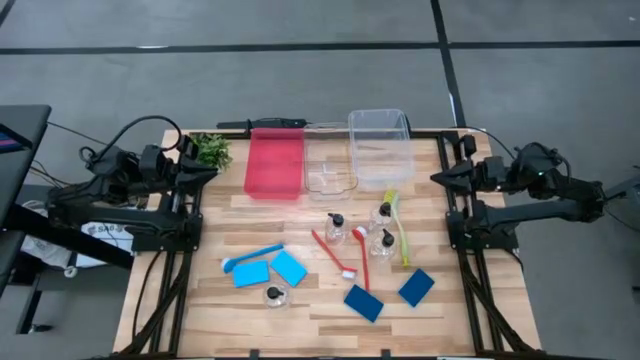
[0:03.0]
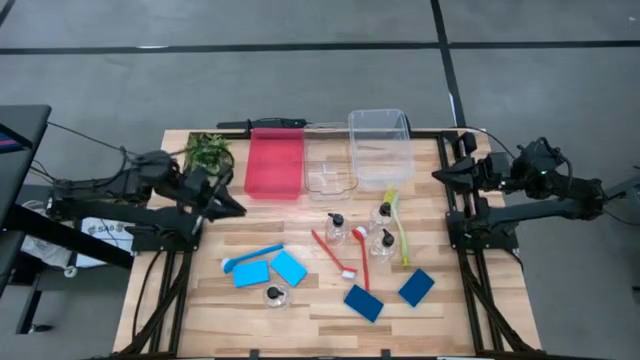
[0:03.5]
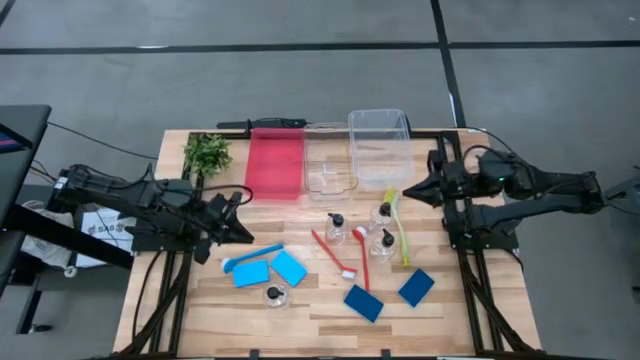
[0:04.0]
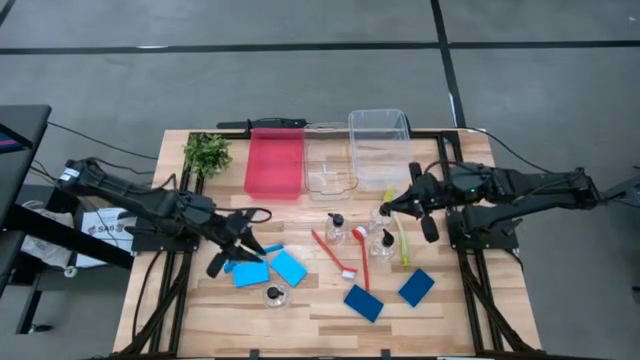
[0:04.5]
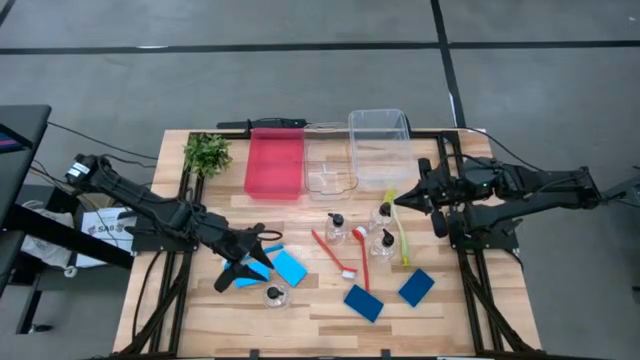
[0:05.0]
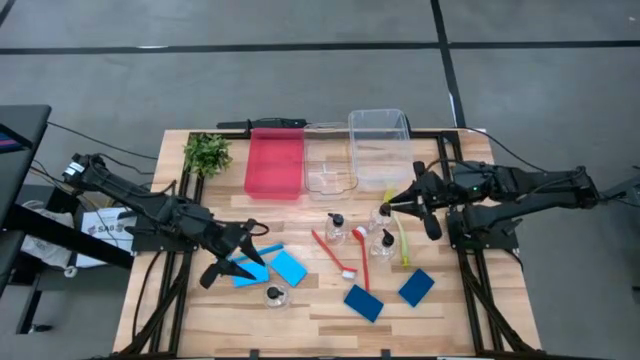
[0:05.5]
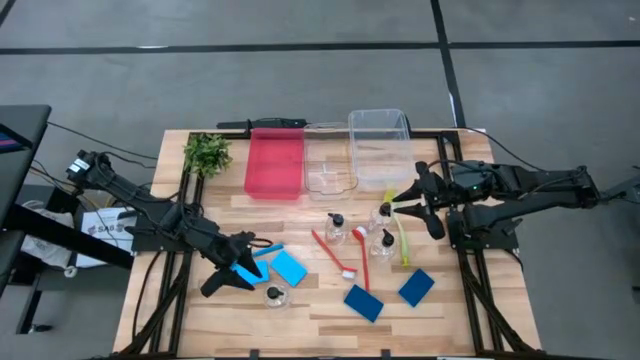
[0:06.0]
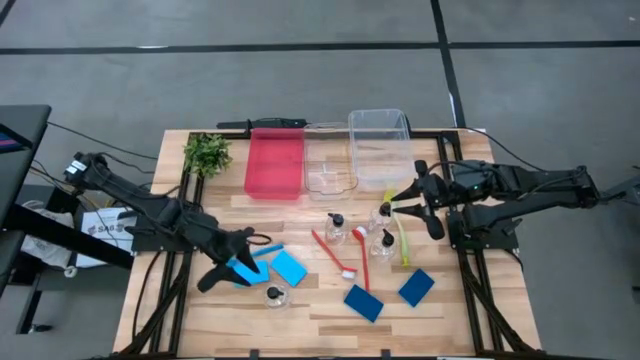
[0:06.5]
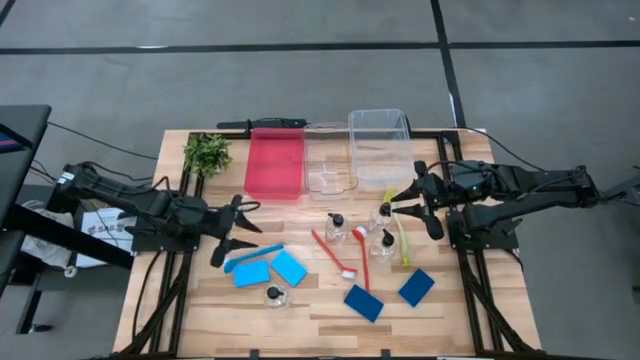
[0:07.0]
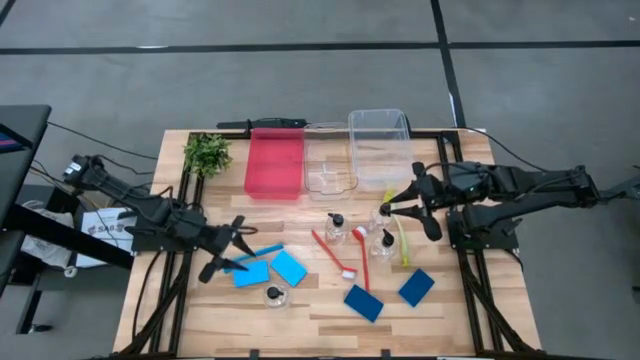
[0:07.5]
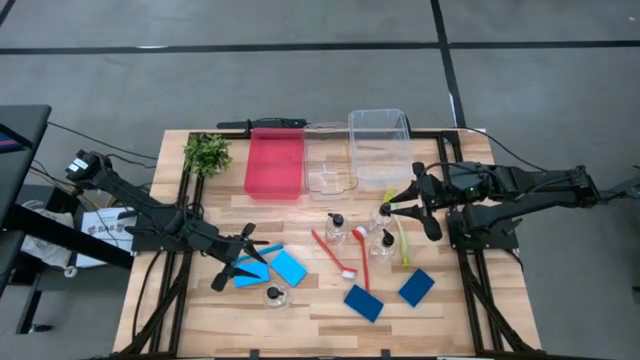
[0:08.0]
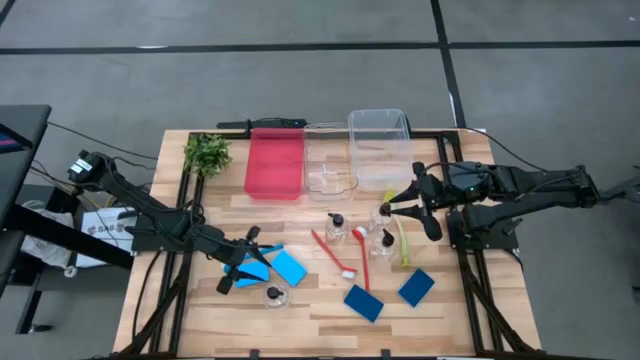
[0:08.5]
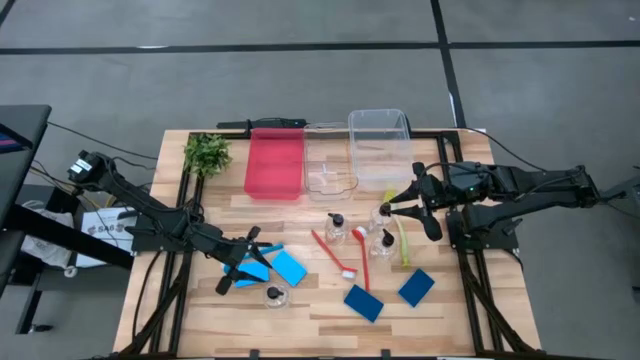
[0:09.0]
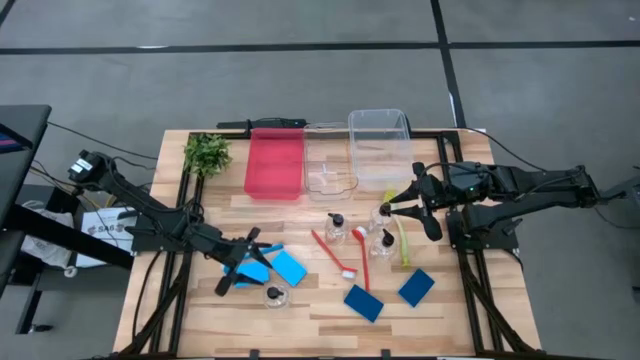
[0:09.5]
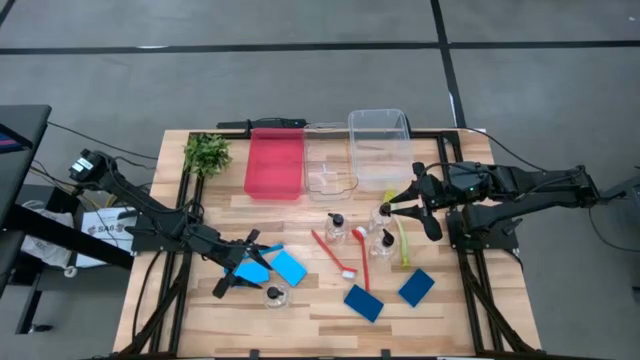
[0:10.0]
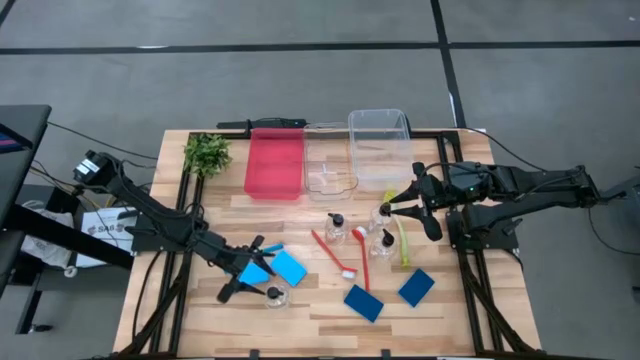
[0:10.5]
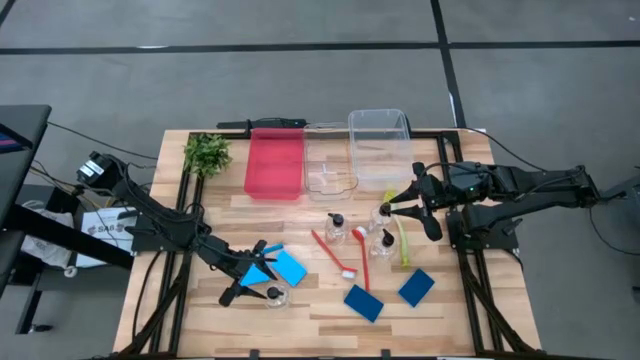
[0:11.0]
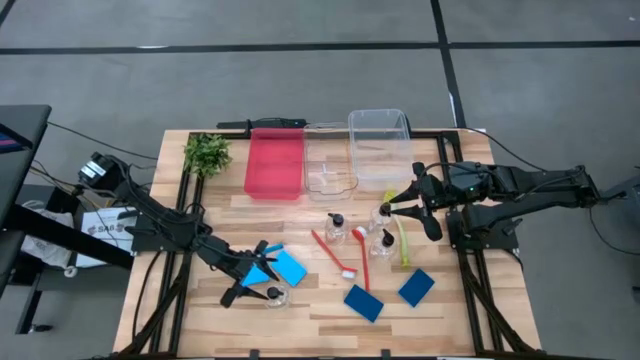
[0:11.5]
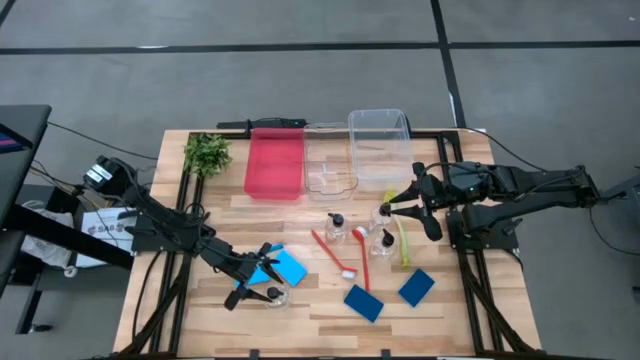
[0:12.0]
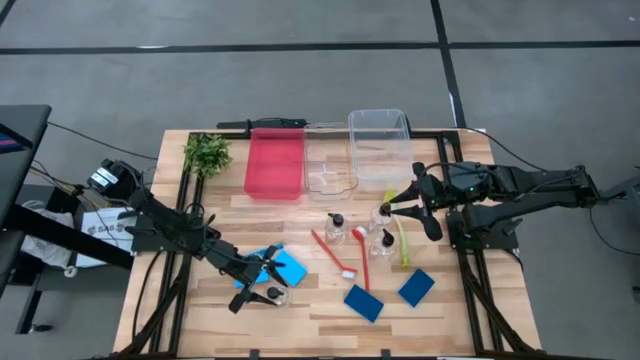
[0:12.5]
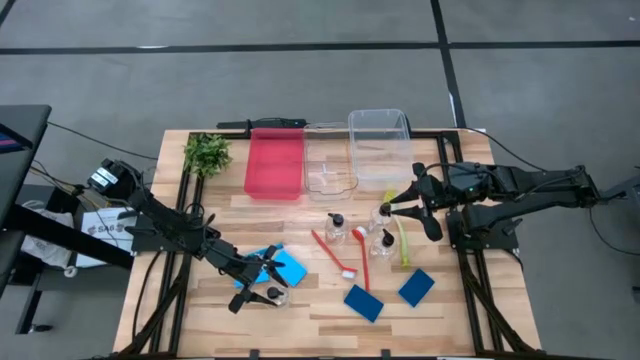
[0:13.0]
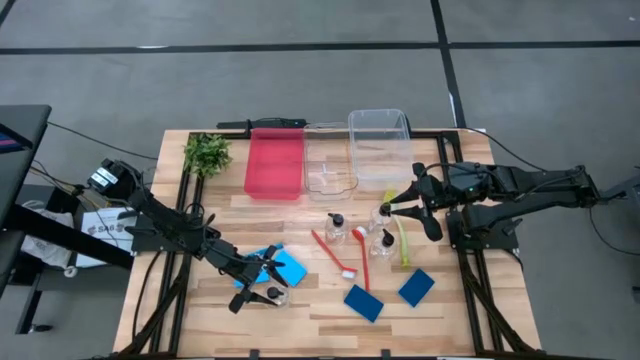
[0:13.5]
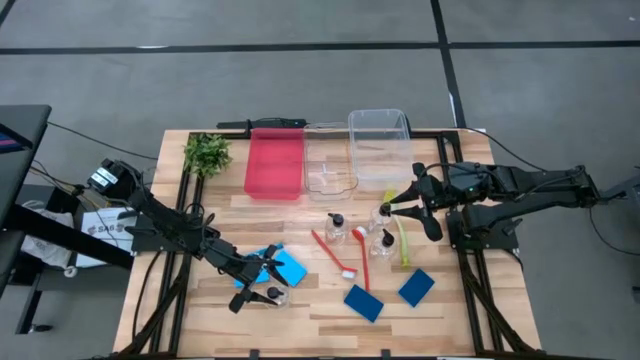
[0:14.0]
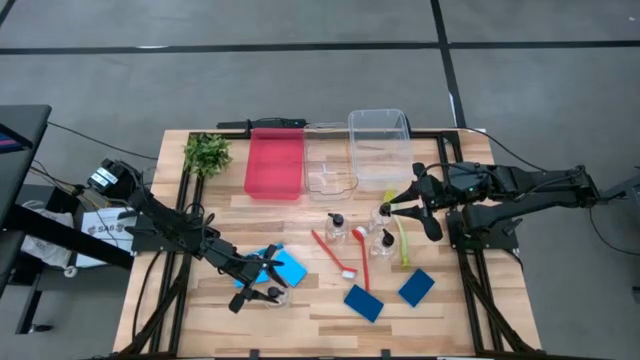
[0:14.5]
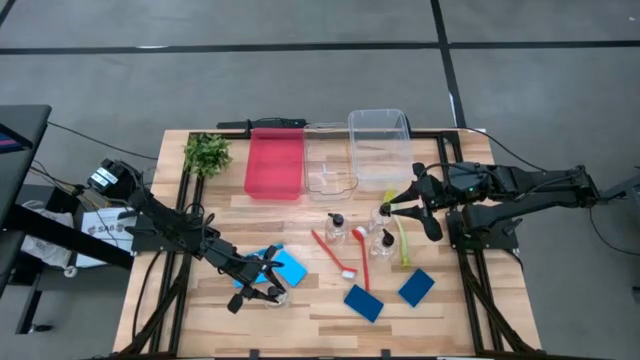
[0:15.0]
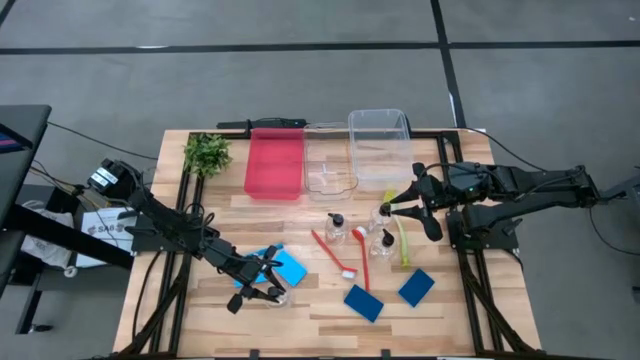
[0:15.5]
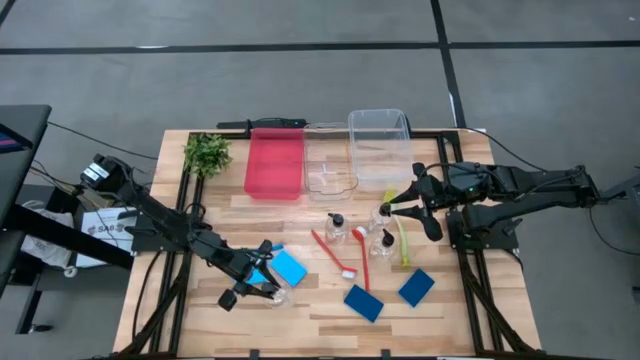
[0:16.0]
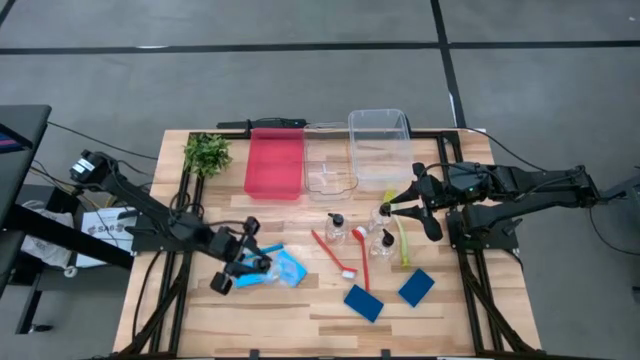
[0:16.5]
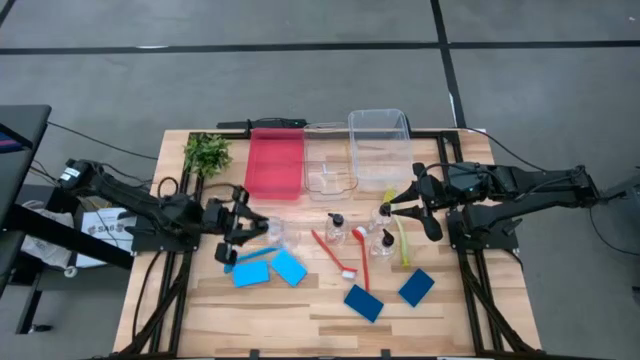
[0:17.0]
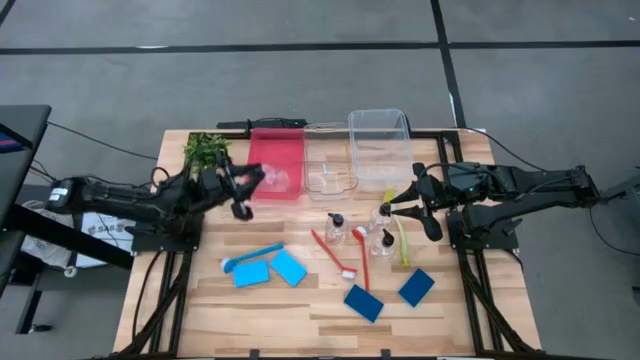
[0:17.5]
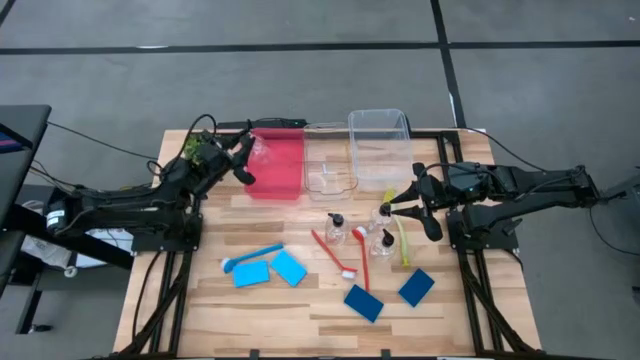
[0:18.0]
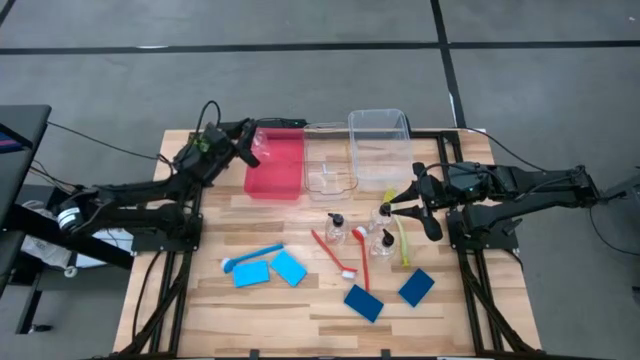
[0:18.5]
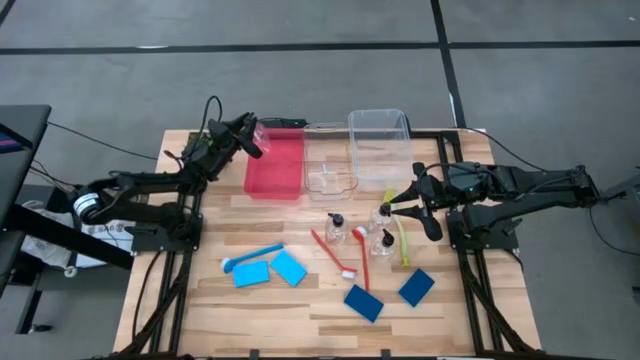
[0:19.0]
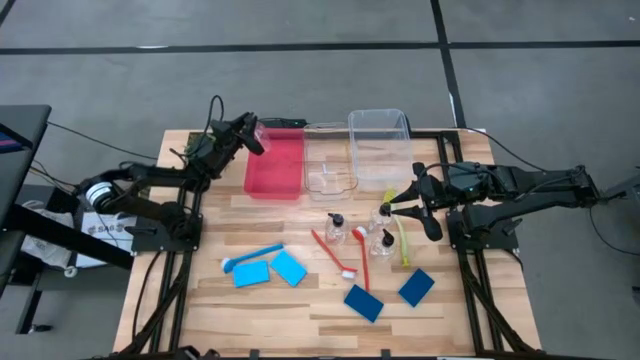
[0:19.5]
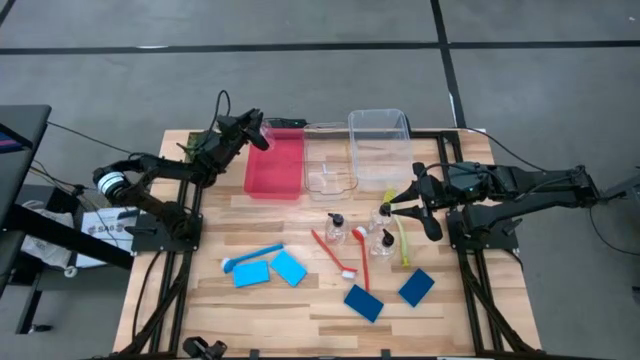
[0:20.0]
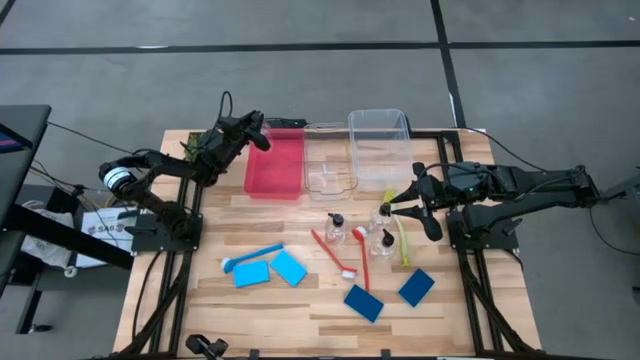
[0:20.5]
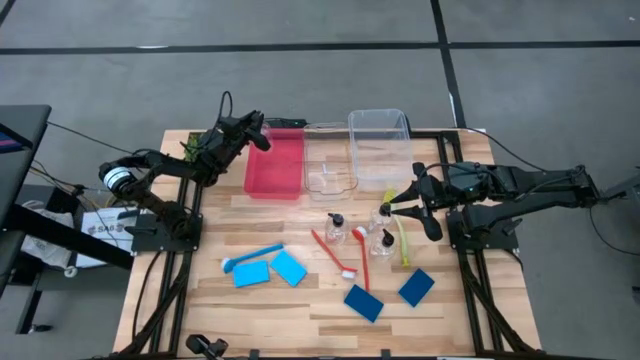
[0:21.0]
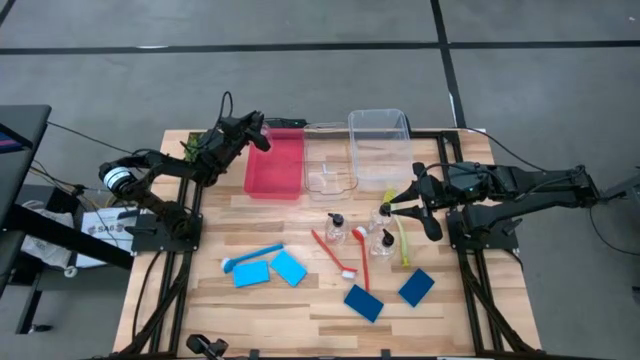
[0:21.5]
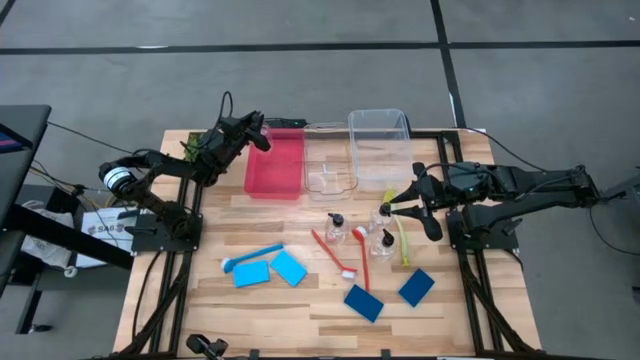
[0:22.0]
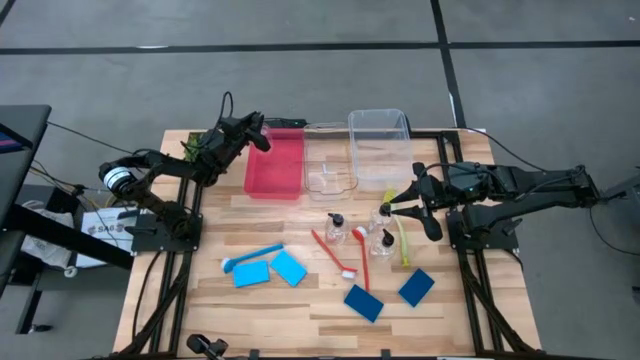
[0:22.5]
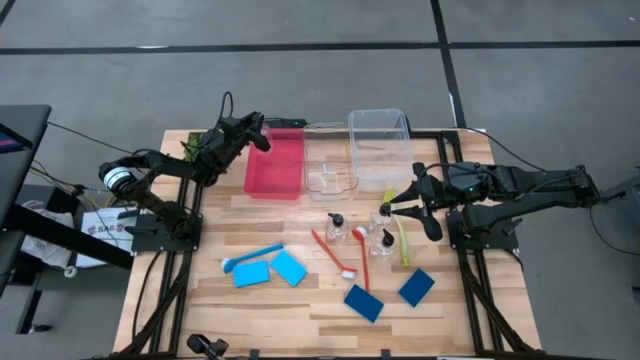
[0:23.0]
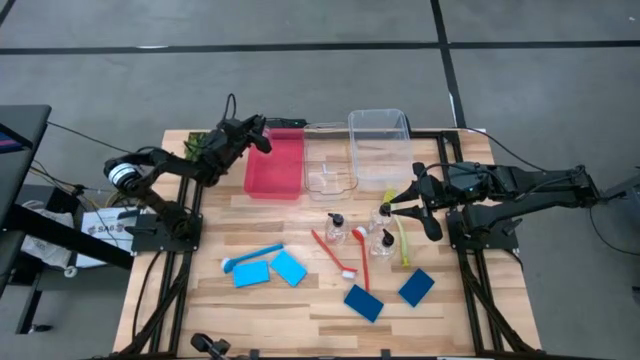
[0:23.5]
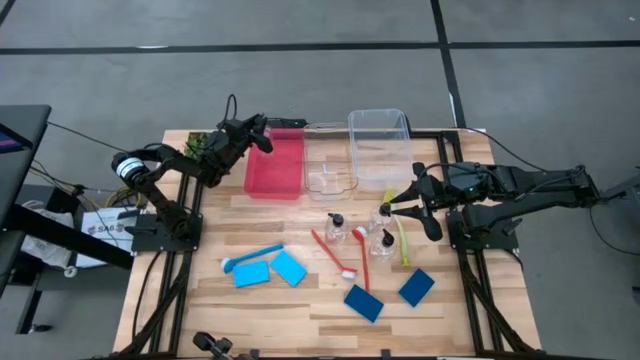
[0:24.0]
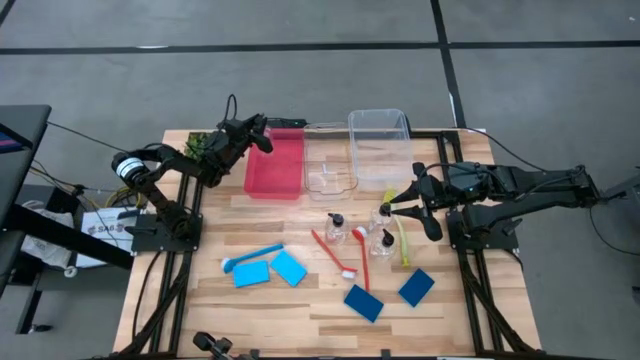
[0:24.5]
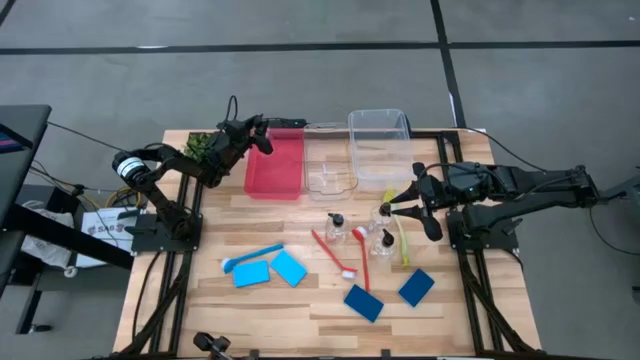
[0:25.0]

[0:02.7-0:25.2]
Task: Pick & Place Kitchen Sink Supplies
Put the transparent soap dispenser into the red bin
